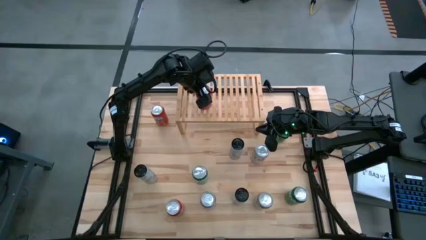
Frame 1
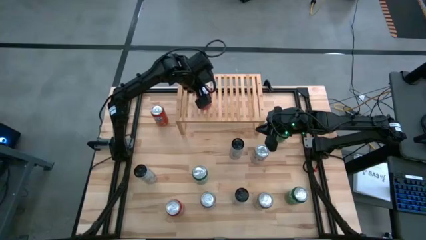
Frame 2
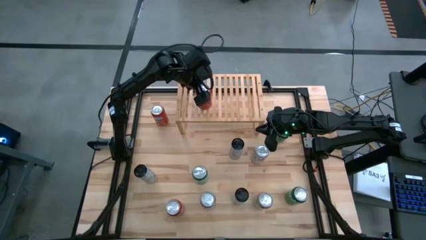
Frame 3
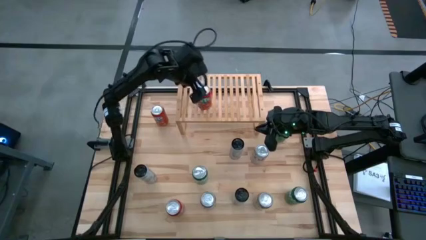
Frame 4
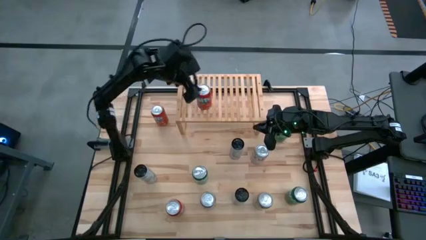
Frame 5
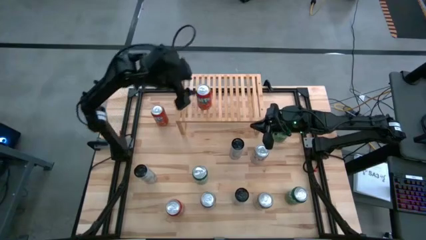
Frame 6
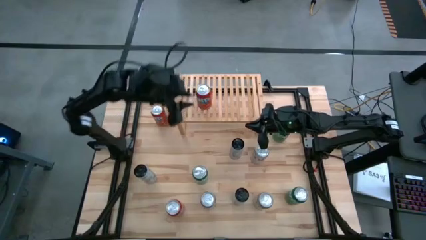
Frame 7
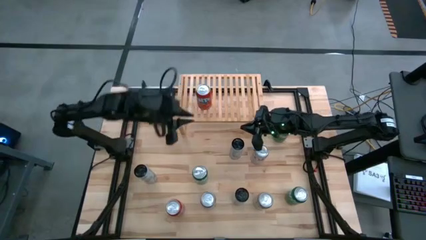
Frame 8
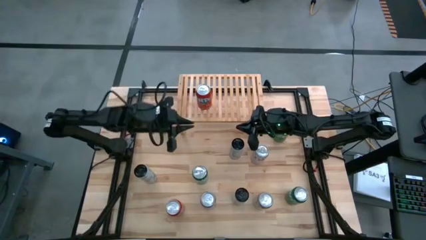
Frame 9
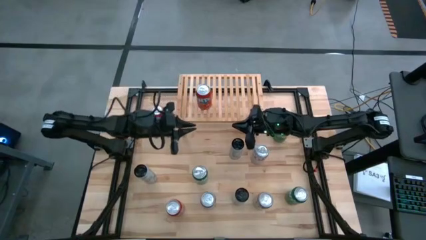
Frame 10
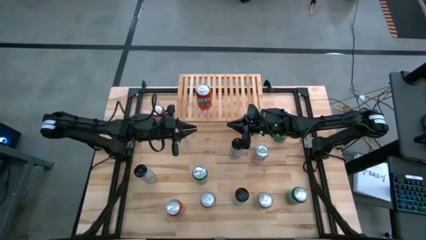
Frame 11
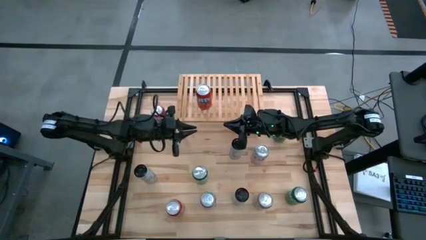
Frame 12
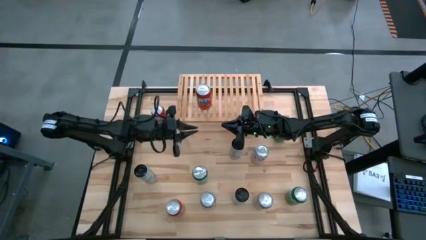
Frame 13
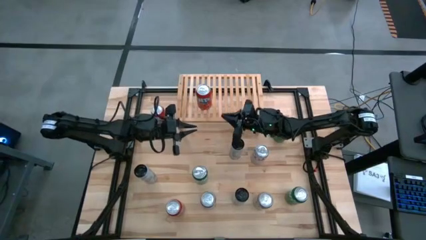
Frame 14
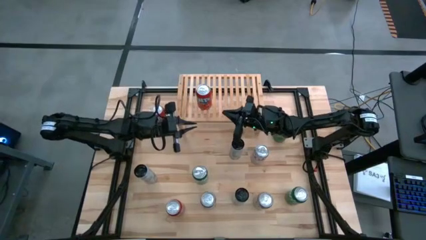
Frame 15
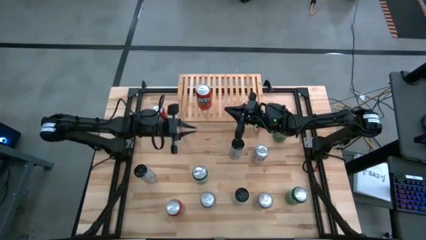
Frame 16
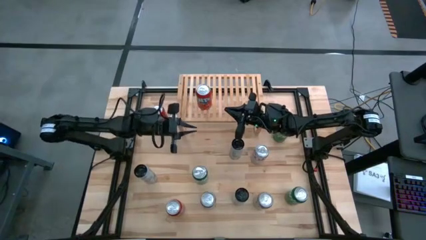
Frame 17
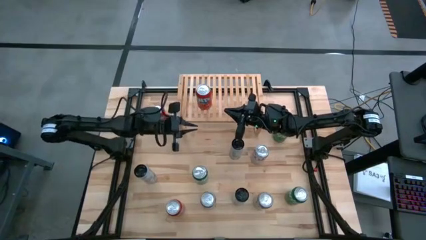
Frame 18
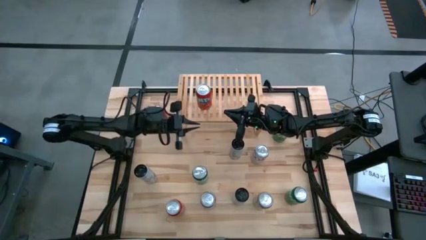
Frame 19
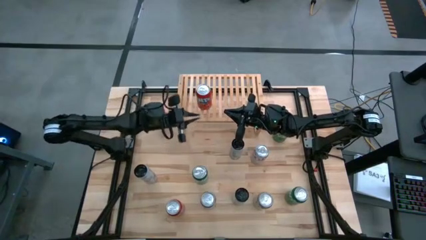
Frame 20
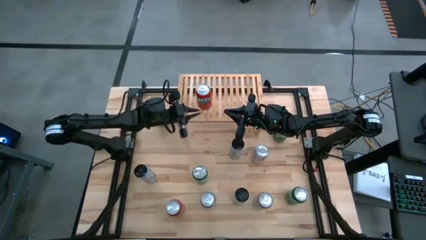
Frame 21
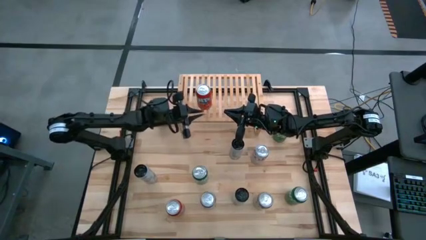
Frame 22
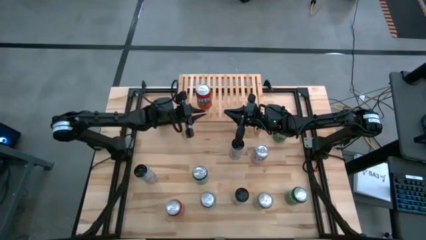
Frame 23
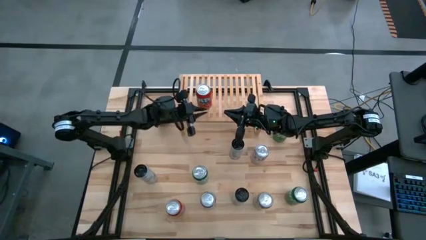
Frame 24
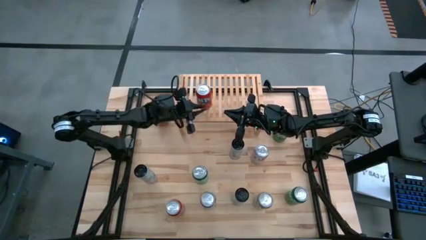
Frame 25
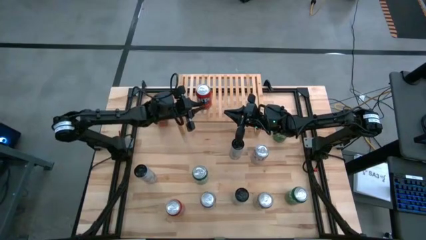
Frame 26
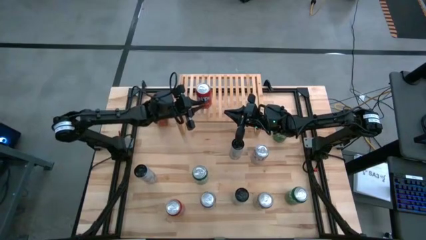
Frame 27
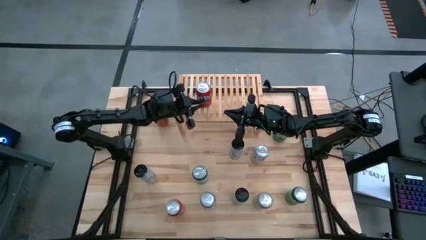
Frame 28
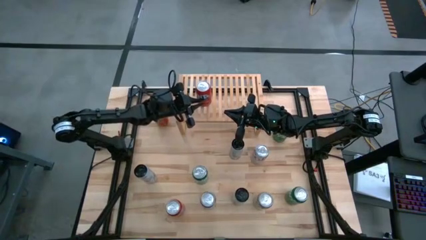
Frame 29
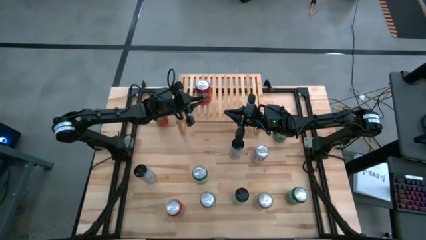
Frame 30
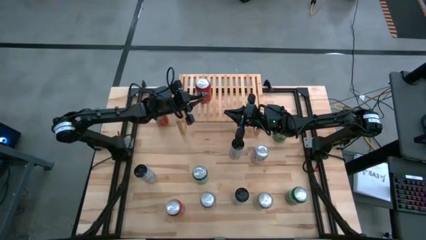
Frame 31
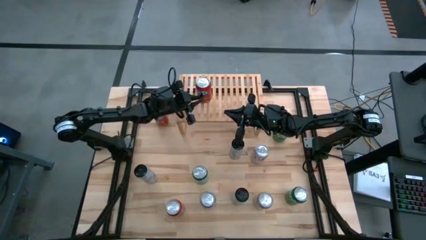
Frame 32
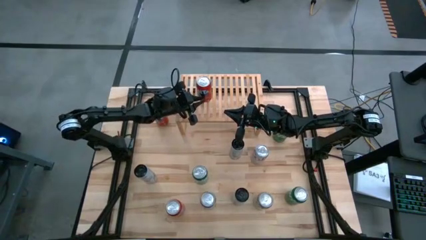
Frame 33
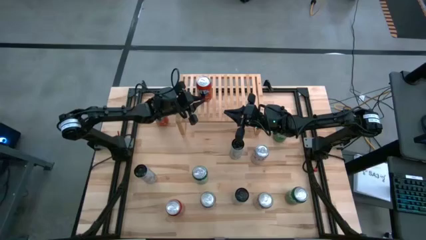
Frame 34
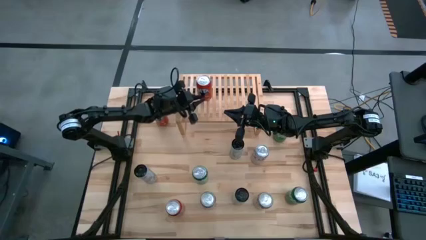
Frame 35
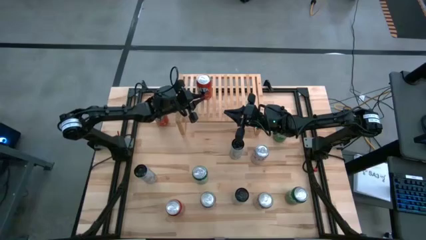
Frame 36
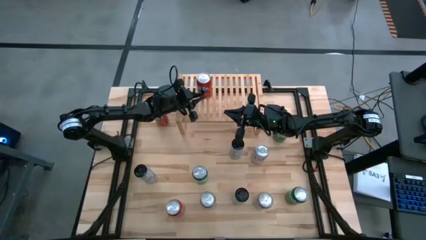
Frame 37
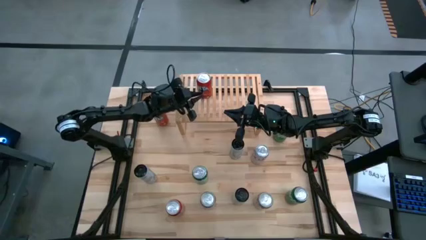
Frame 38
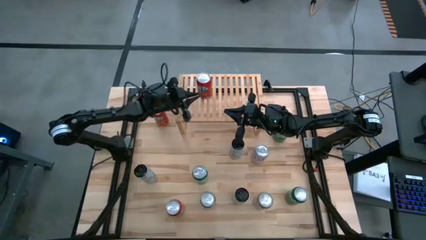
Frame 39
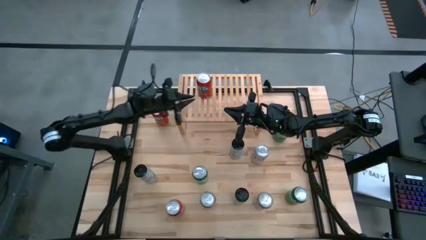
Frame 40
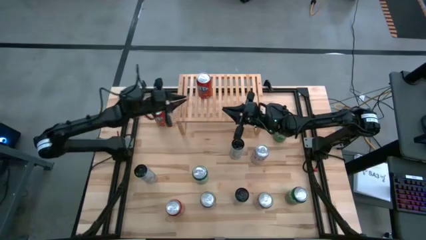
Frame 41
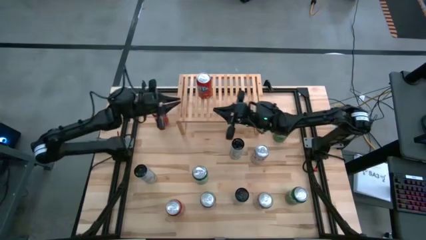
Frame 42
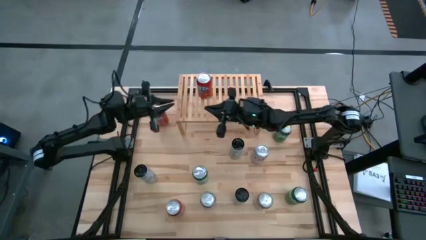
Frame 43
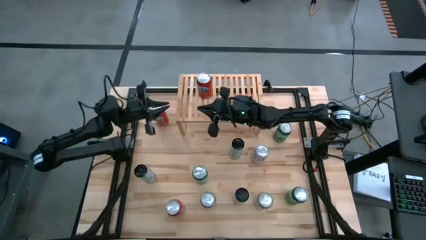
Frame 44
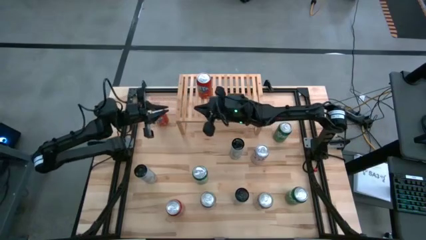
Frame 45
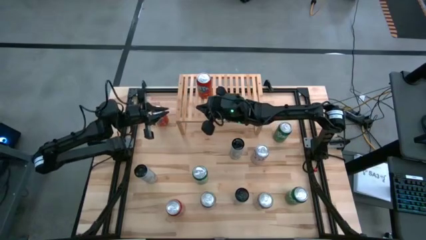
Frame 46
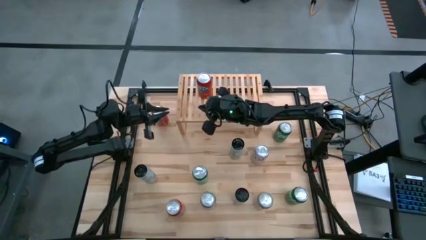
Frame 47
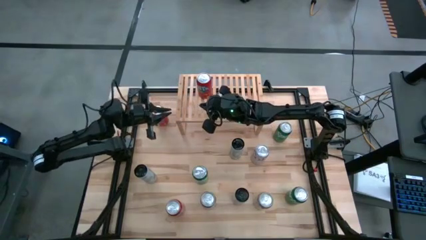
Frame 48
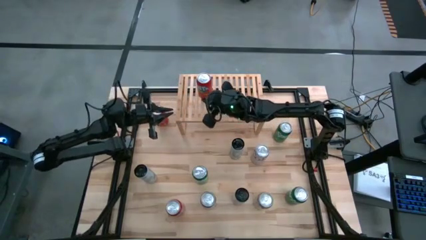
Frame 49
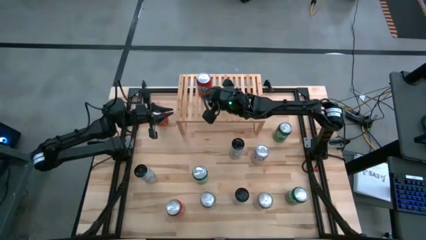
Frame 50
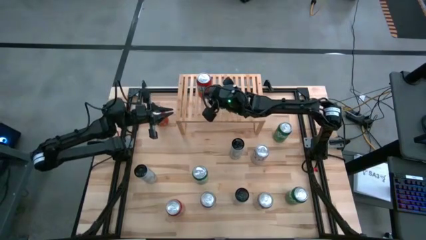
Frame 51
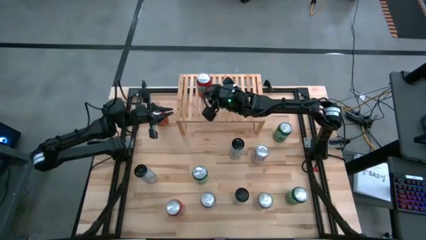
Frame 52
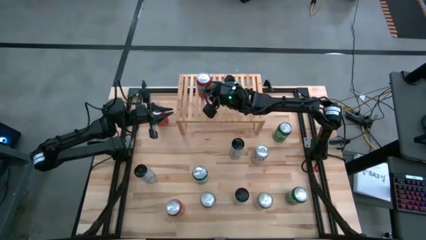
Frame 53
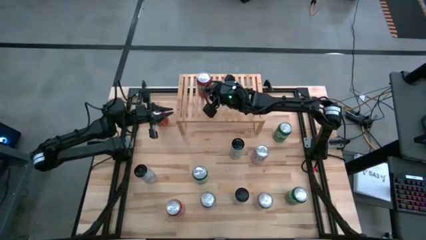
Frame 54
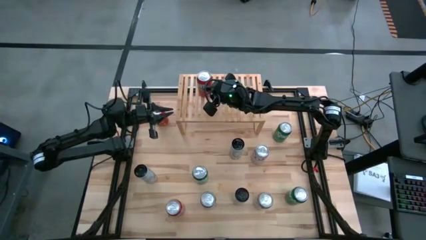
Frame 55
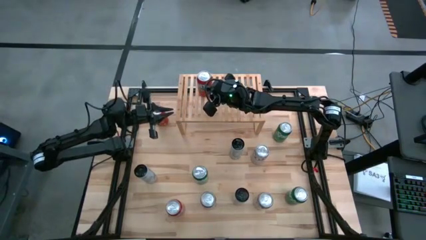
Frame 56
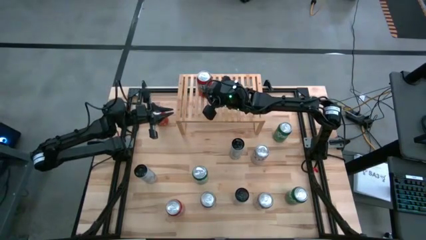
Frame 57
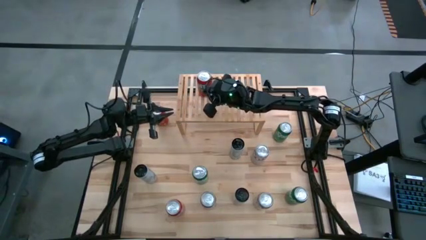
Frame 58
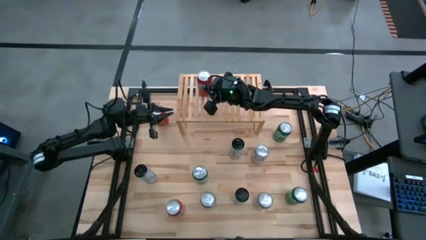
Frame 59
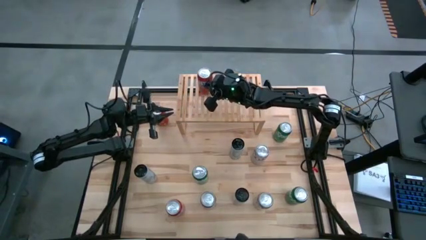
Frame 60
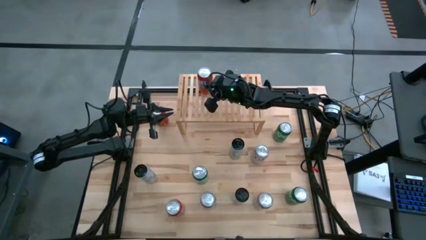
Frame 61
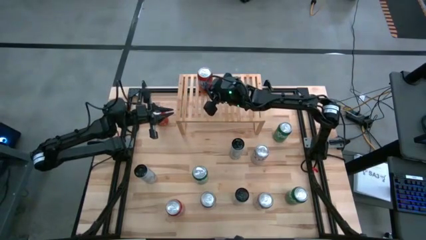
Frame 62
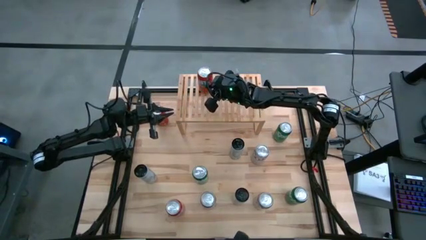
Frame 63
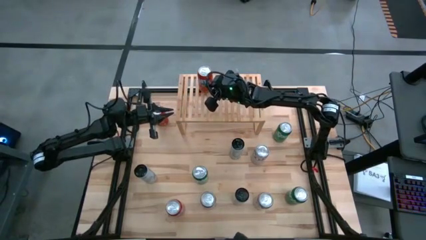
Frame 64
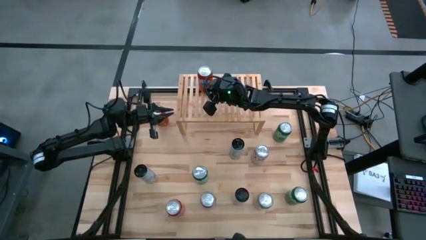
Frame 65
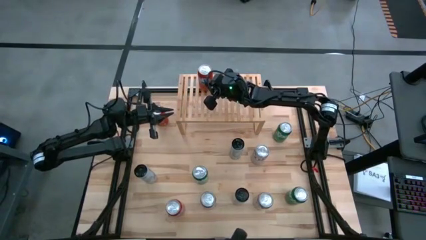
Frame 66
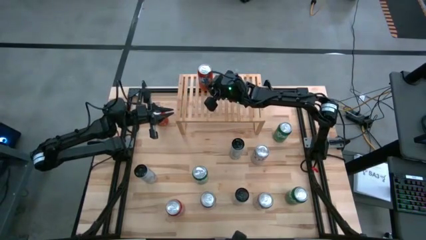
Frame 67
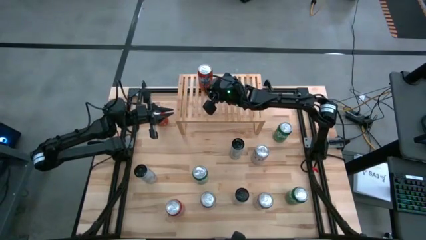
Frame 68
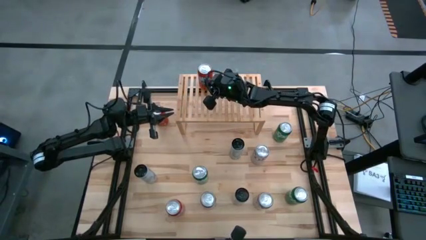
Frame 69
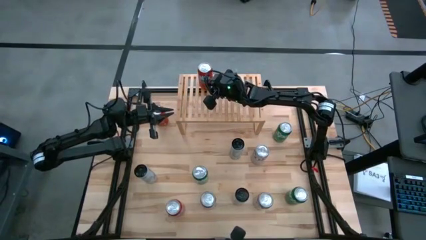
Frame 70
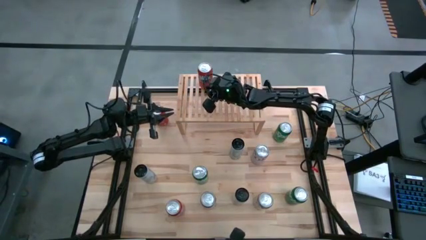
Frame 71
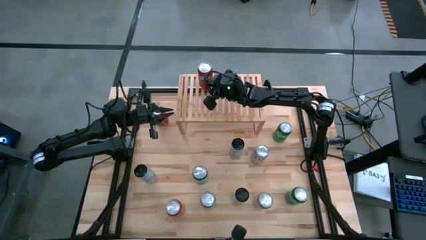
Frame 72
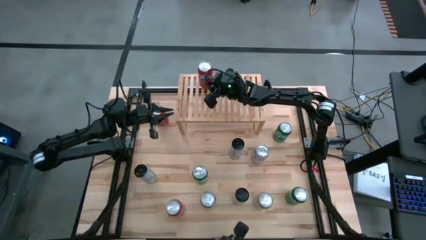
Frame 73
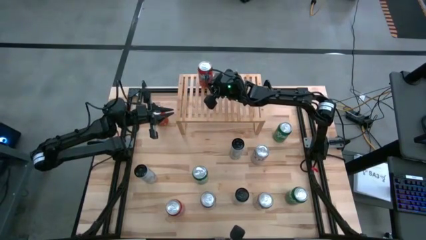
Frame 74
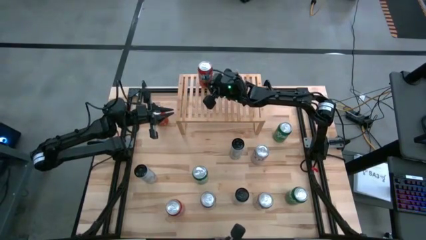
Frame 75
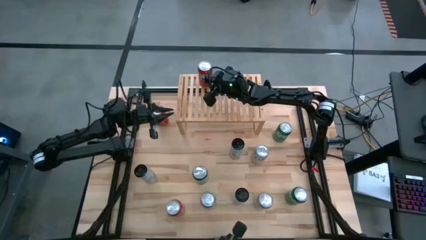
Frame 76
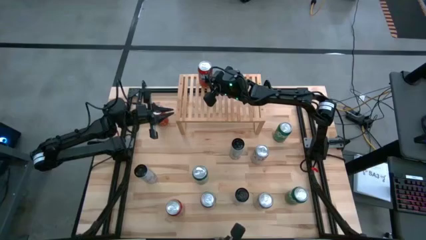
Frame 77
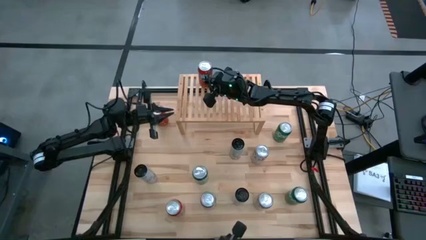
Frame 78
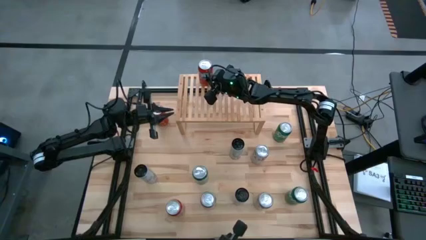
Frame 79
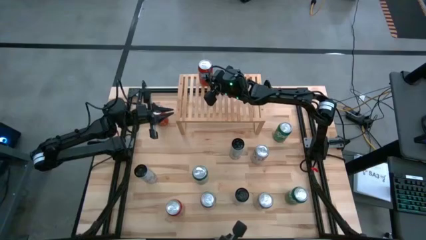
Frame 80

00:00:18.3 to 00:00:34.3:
Task: Place canned beverage on shelf
Put the middle red soda can on the shelf
